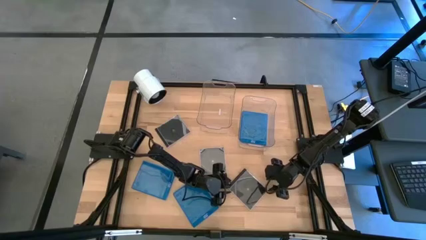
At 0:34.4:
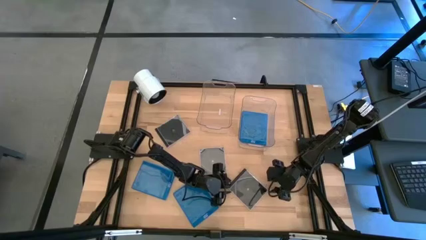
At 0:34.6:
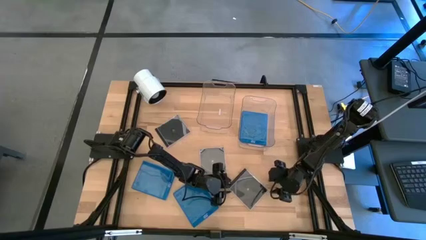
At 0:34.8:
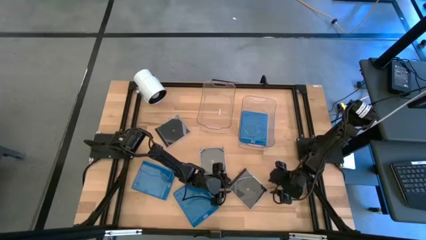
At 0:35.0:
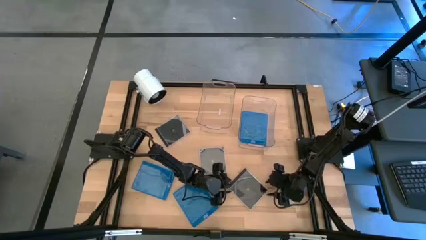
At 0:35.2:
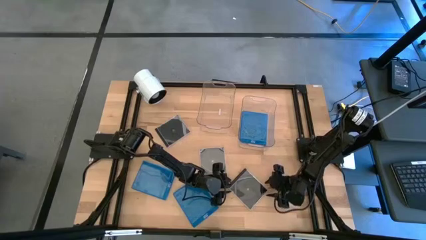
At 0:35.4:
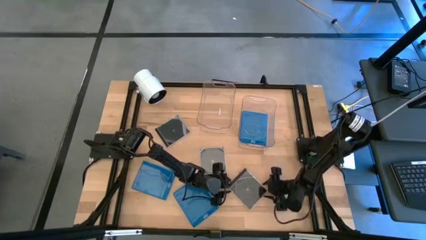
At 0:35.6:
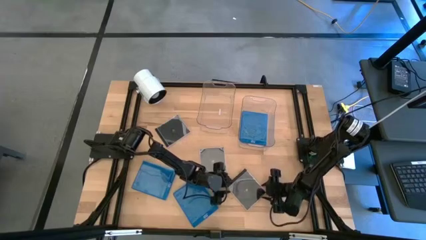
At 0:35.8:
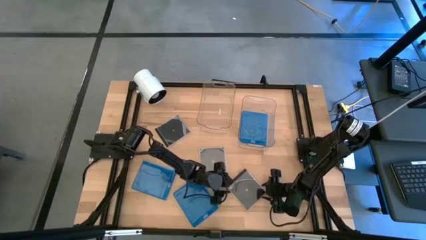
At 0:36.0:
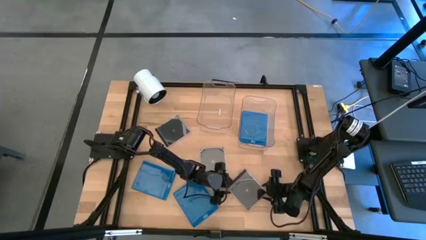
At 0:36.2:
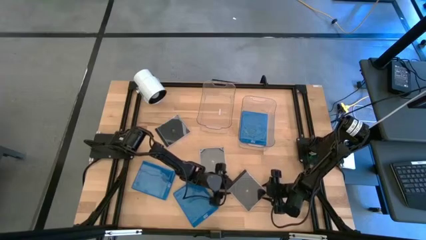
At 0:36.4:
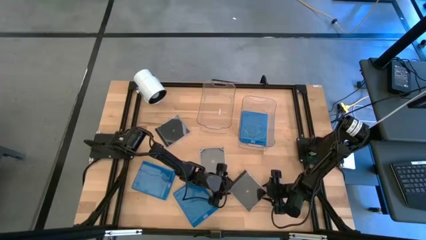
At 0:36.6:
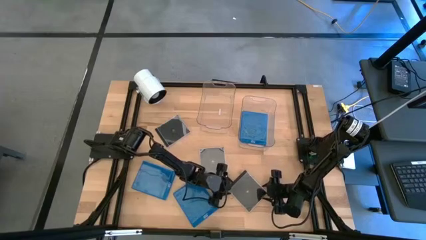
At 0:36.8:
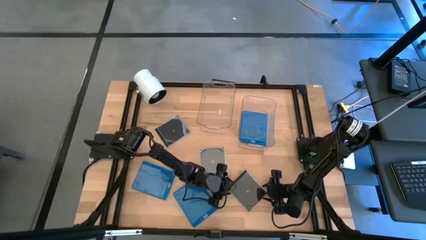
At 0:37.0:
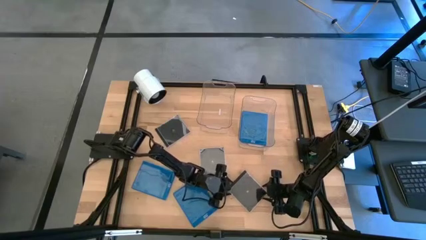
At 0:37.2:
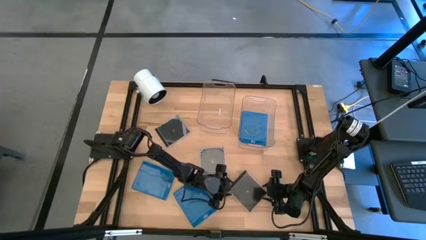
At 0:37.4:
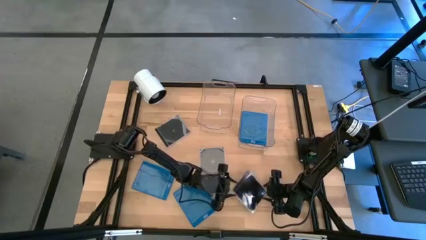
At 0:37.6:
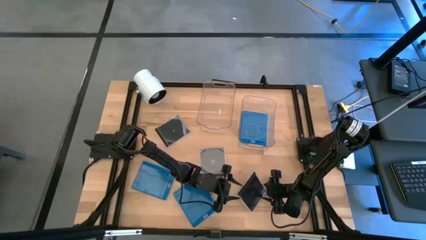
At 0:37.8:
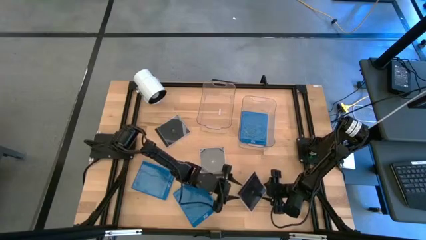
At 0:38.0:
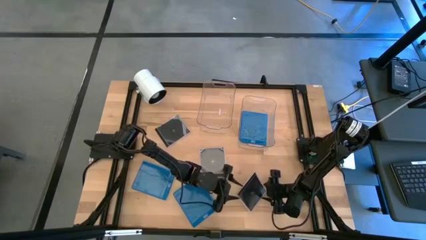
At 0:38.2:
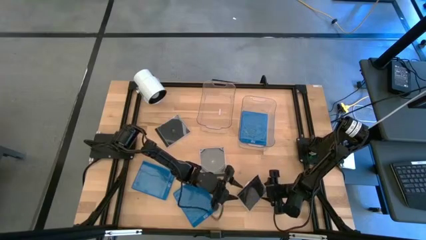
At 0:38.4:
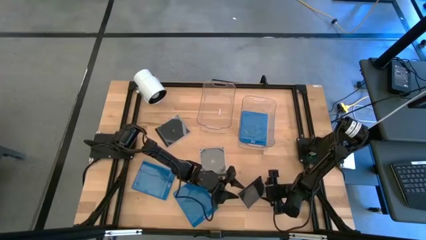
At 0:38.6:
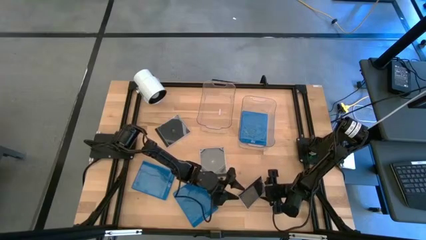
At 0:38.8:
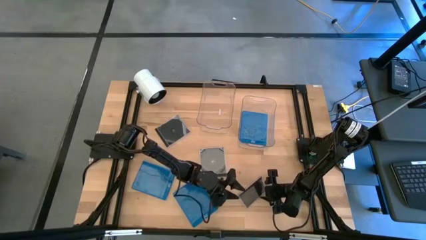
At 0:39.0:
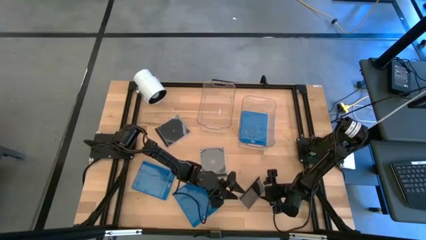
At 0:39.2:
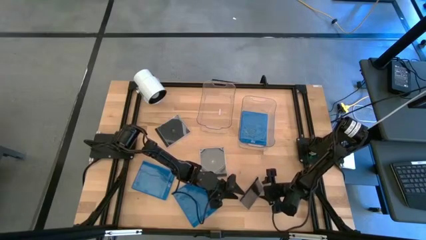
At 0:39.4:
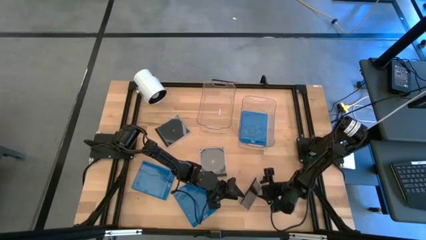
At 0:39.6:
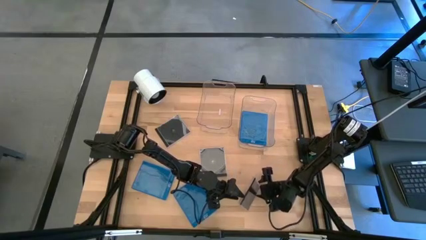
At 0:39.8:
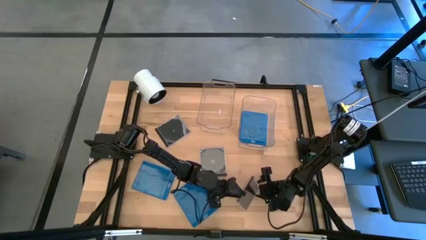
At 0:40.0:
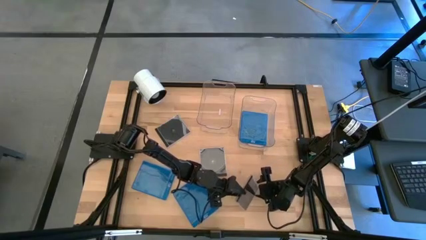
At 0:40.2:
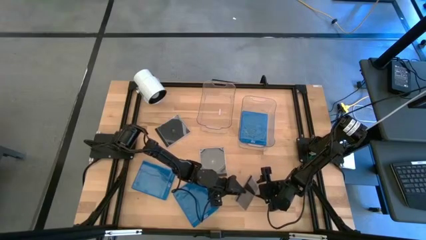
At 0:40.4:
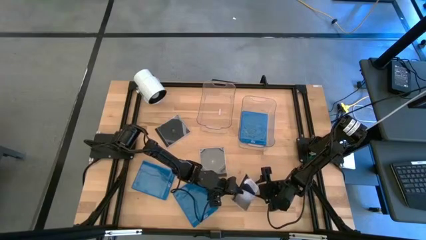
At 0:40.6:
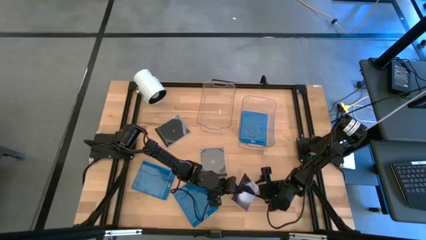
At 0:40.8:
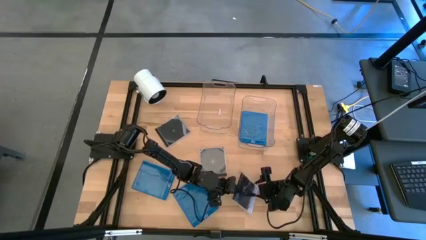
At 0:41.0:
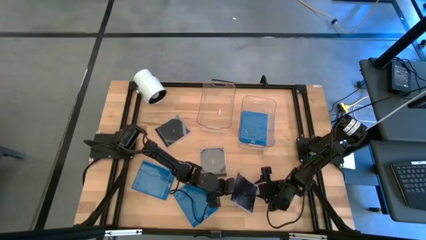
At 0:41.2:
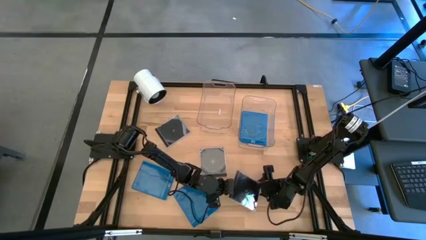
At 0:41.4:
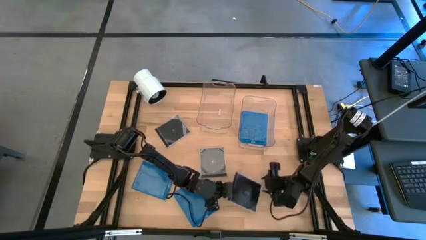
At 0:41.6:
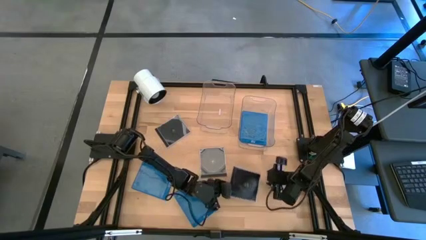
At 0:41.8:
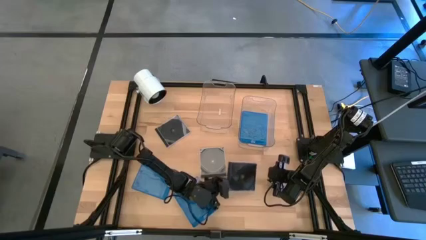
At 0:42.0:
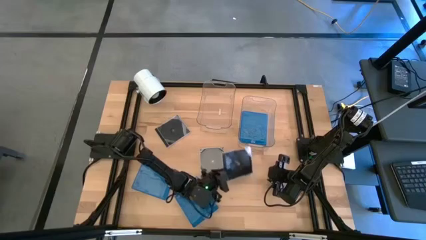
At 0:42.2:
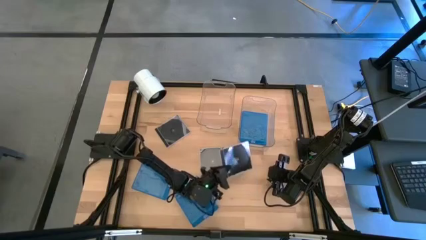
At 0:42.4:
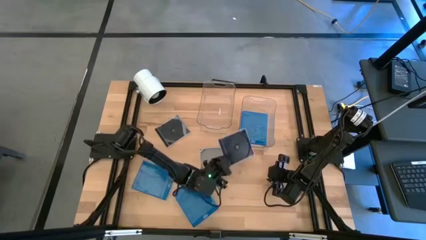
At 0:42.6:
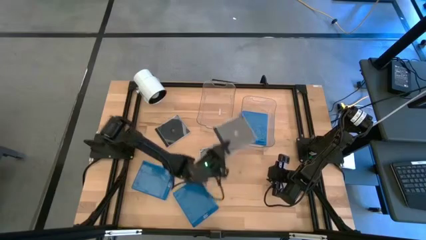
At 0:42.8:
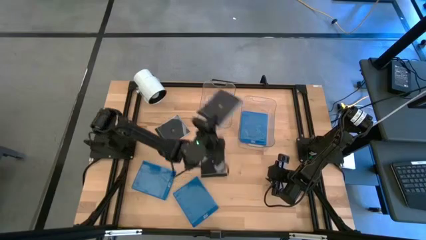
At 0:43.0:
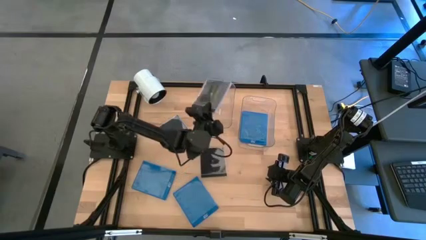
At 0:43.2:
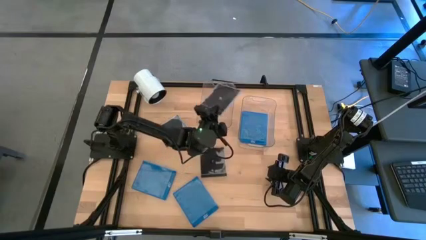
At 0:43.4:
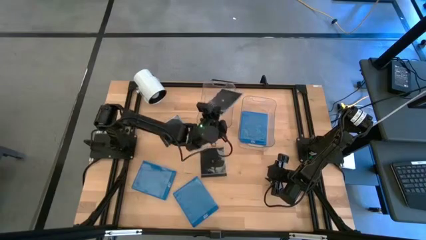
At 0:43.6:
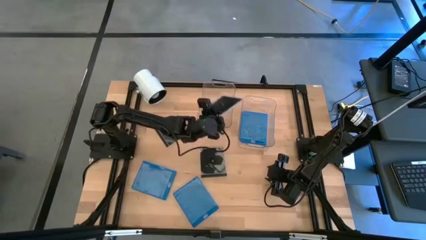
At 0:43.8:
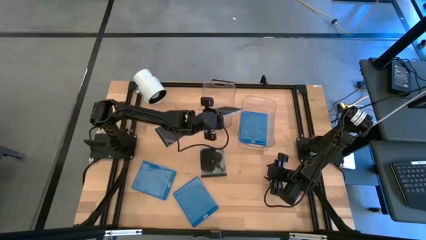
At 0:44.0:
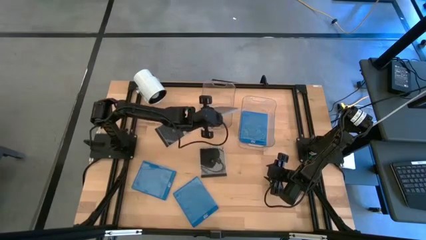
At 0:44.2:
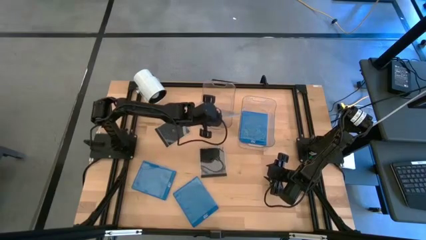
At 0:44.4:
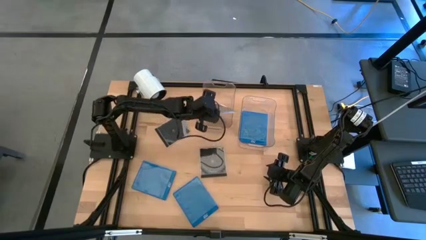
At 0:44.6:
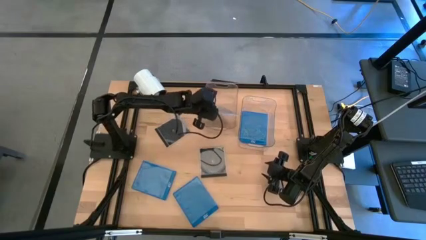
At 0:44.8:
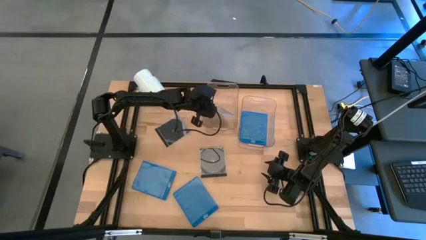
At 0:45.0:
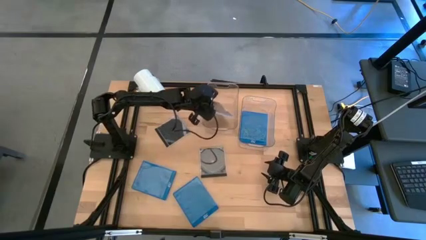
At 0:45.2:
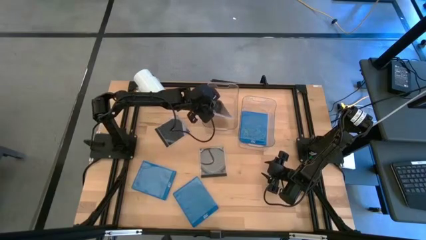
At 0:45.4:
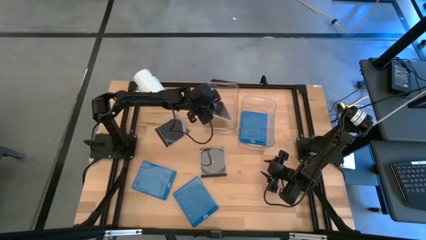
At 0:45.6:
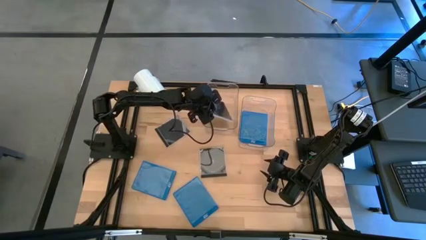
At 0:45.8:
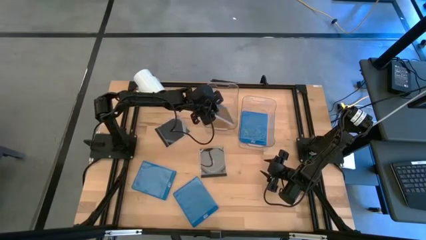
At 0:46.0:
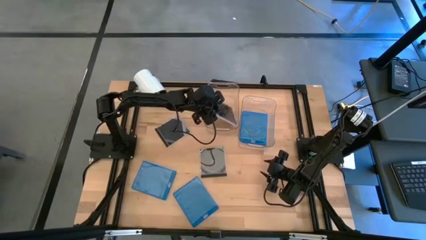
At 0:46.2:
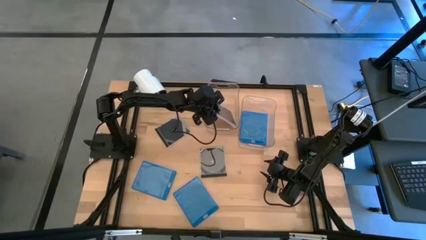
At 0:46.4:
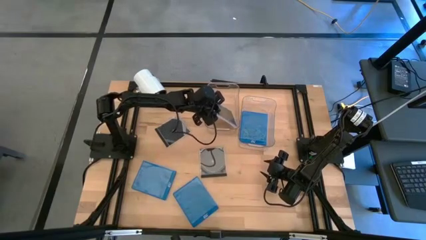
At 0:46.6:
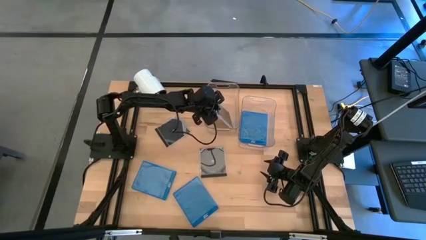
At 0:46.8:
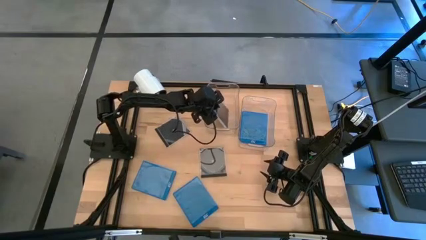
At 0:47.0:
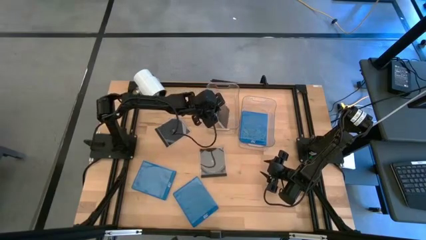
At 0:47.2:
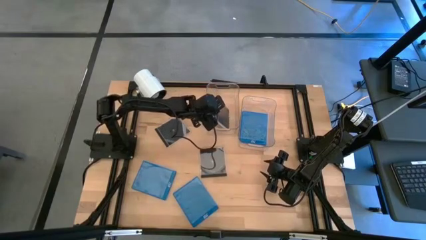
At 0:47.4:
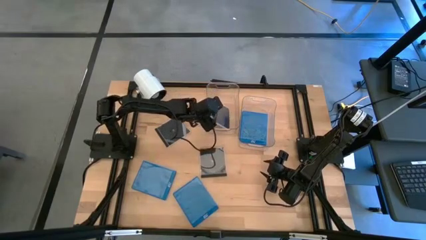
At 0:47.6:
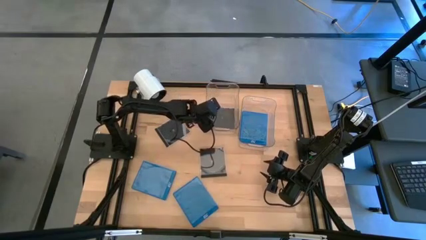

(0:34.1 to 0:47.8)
Task: Pick & place jewel cases by type
Put the bottom black cd case into the left transparent bin
